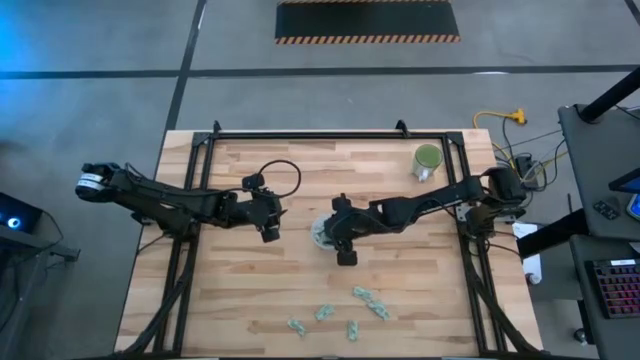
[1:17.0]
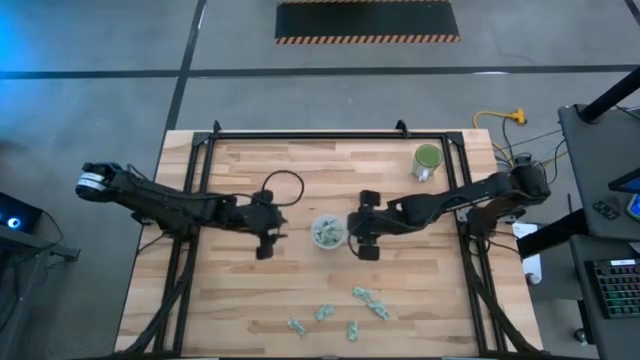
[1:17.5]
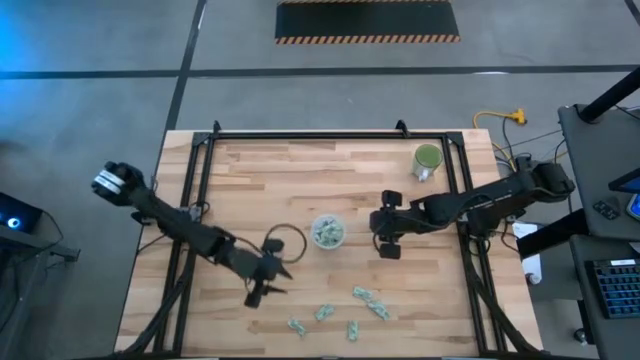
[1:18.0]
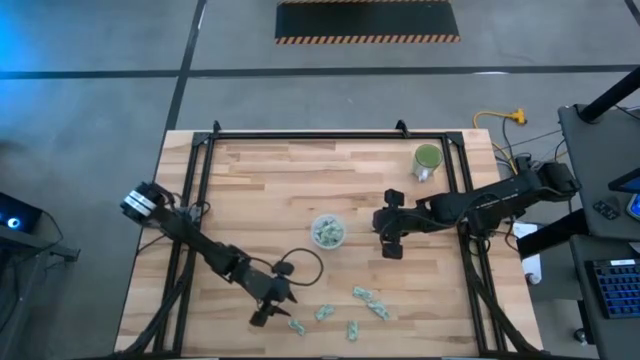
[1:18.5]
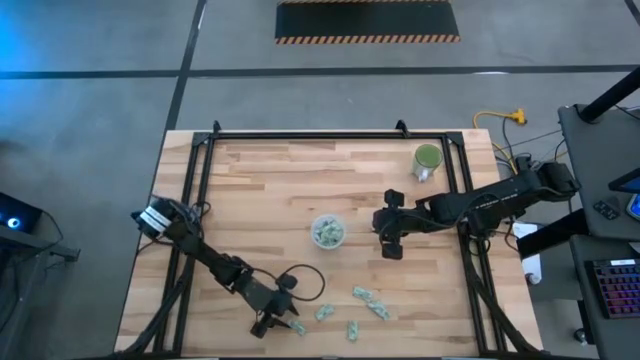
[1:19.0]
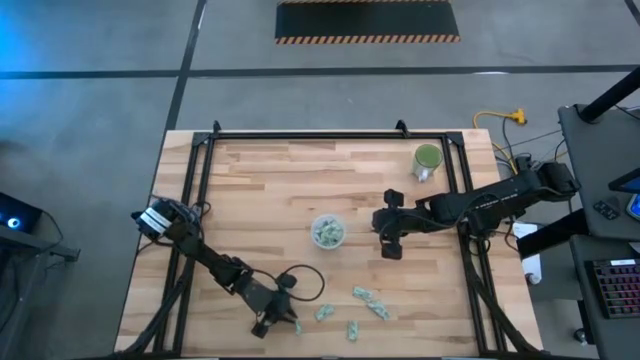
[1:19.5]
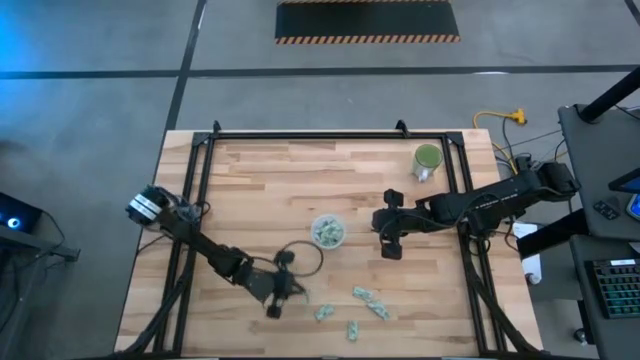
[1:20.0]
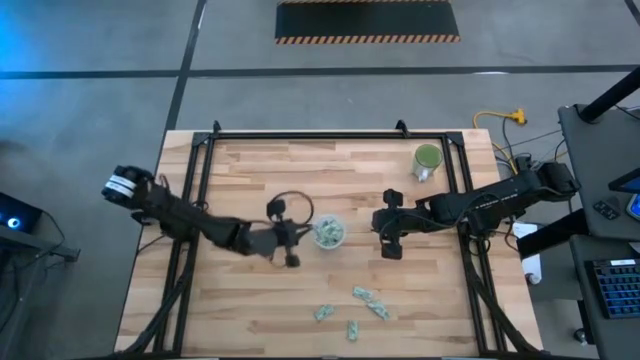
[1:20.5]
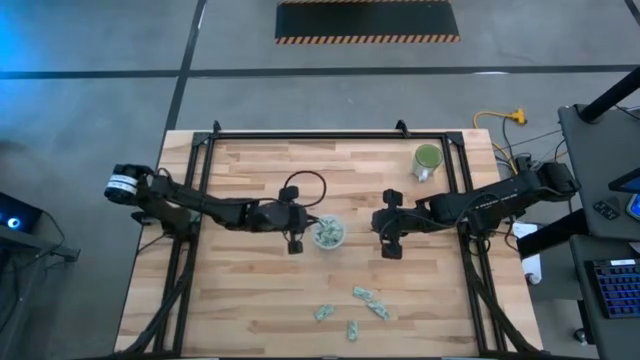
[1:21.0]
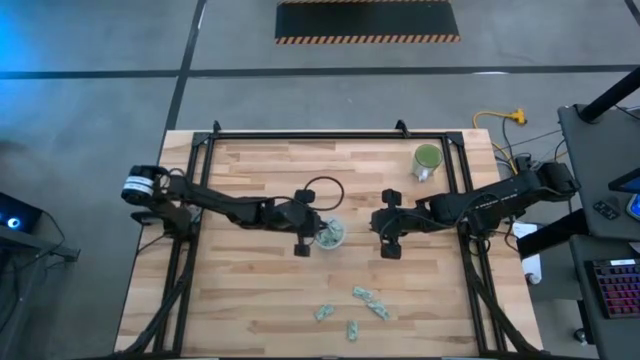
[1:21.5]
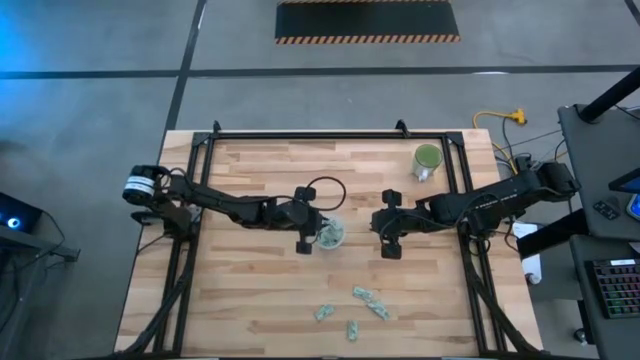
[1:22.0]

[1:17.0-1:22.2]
Task: Pick and place Stevia / Truvia into bins
Put the light green stevia packet into the transparent container

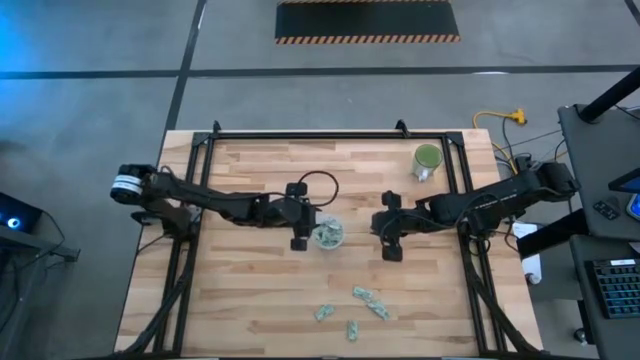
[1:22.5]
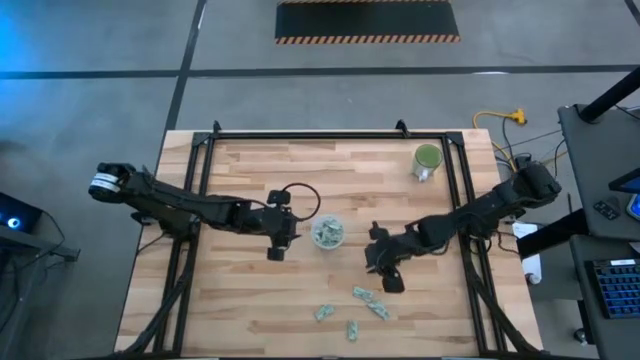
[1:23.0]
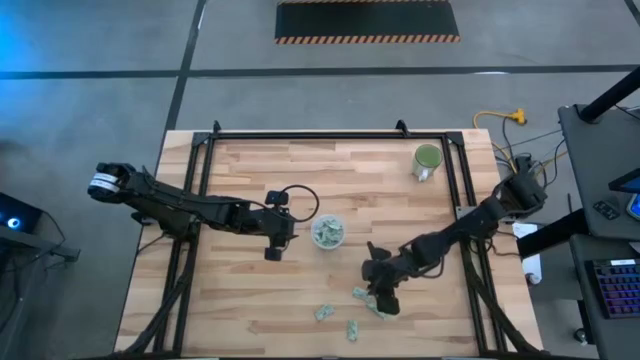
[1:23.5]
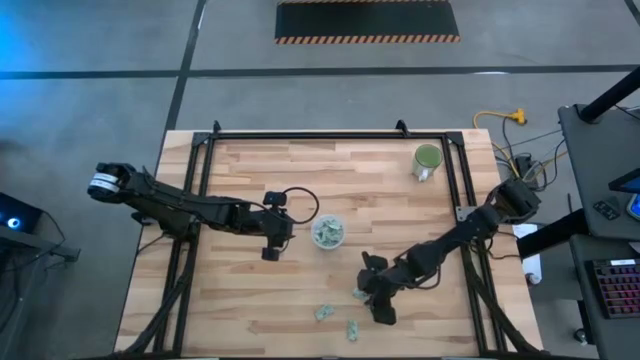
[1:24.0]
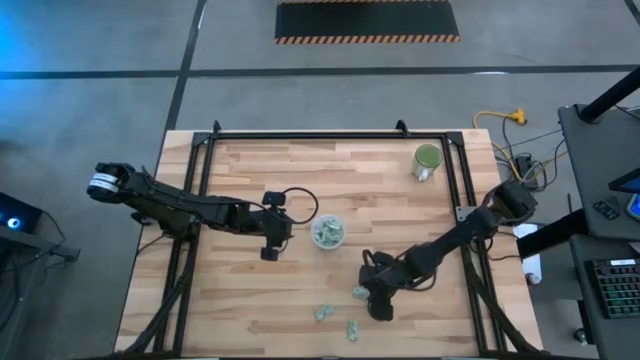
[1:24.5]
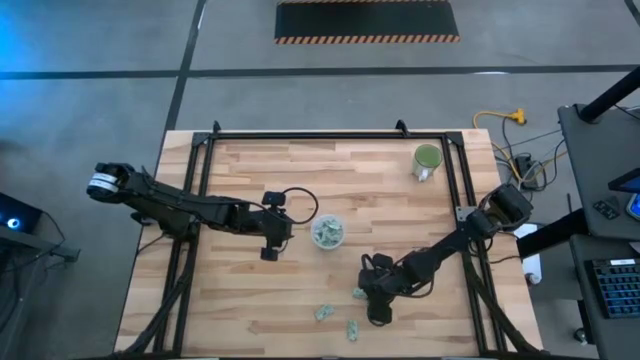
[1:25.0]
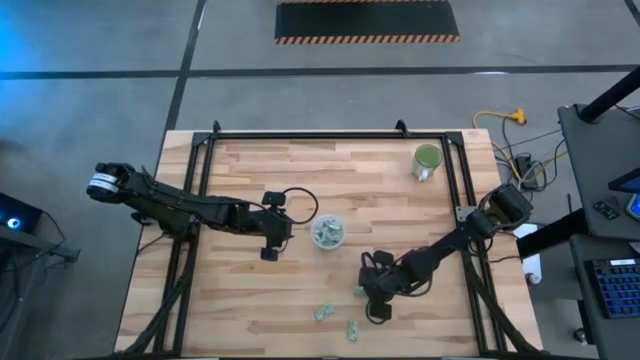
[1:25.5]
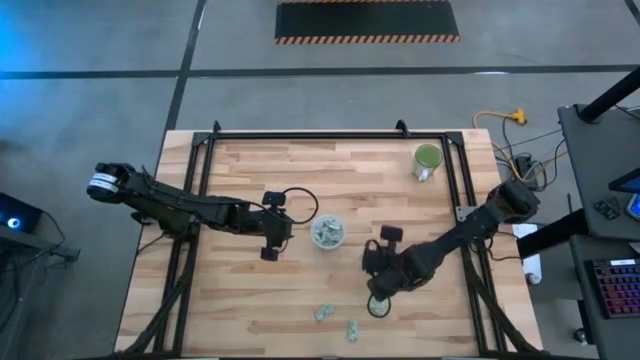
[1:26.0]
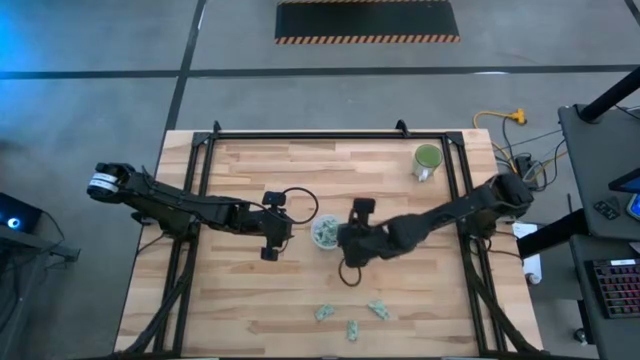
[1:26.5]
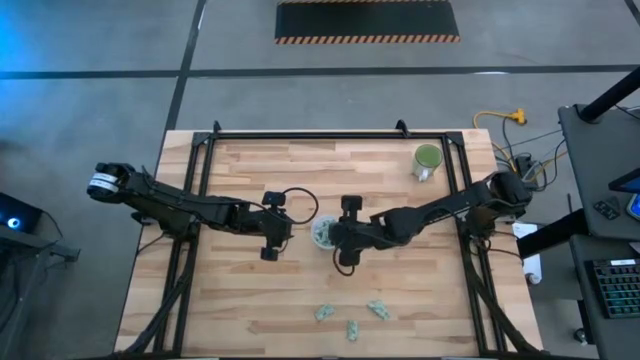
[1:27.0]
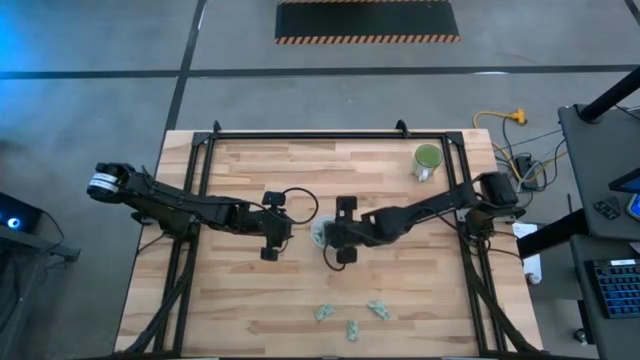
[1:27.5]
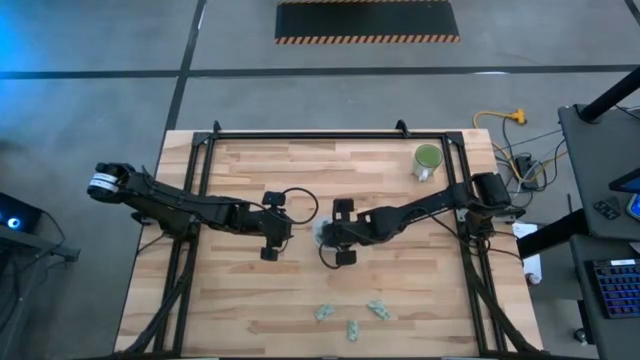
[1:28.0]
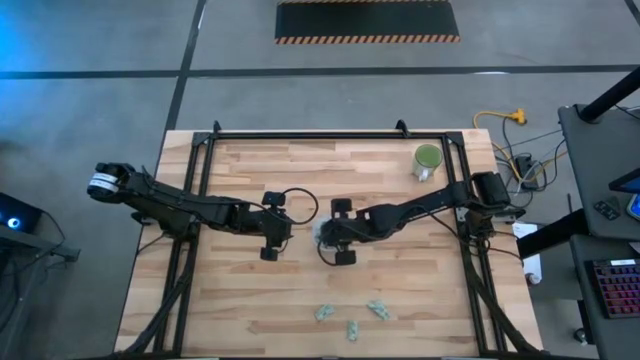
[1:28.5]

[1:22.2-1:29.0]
Put the light green stevia packet into the transparent container

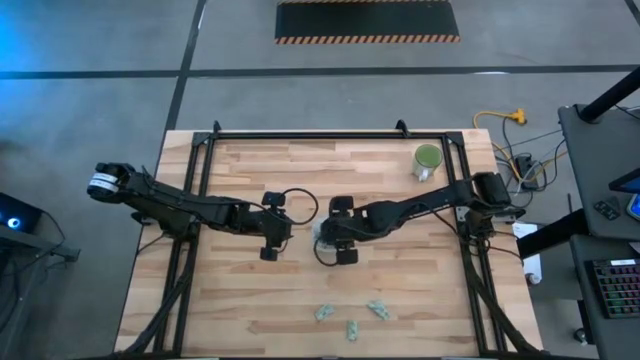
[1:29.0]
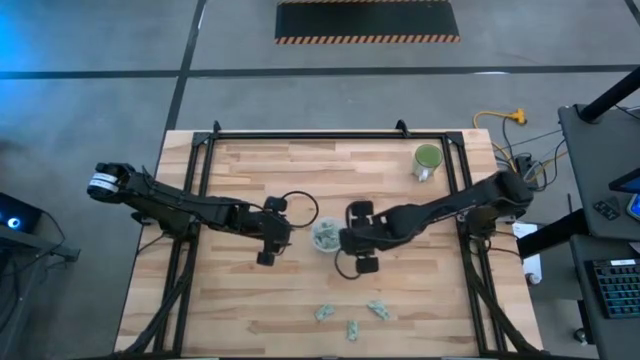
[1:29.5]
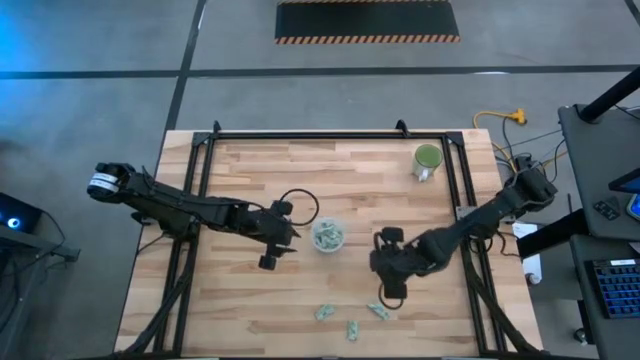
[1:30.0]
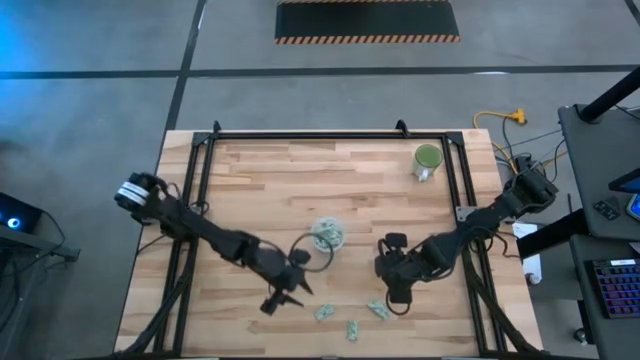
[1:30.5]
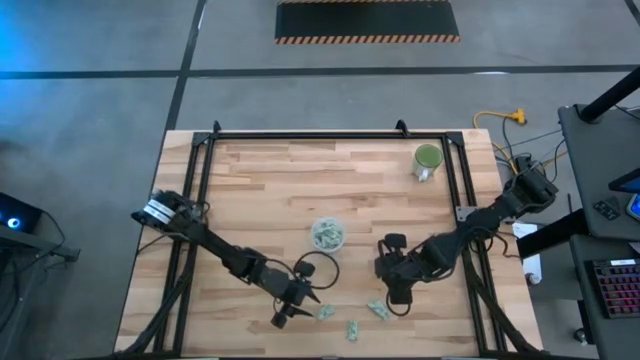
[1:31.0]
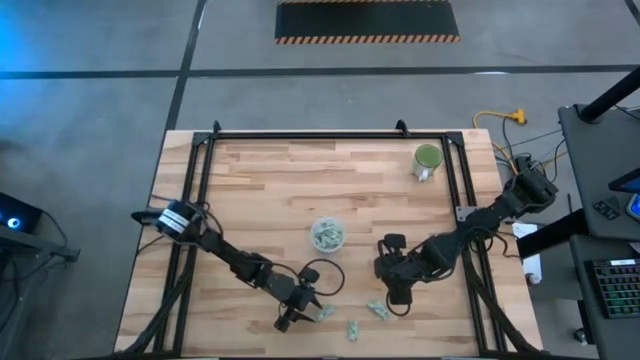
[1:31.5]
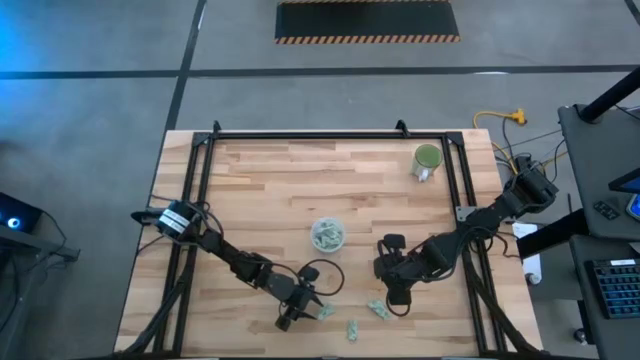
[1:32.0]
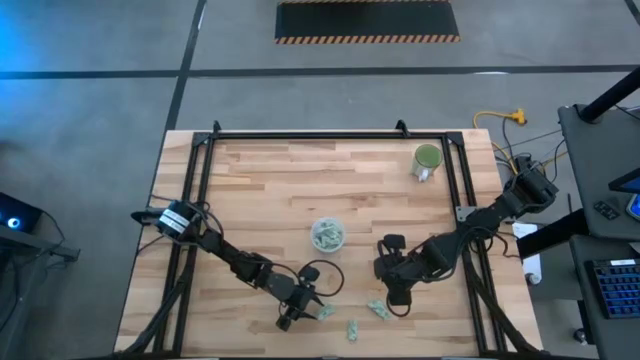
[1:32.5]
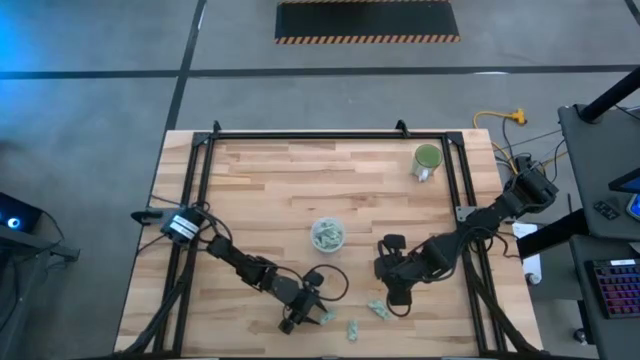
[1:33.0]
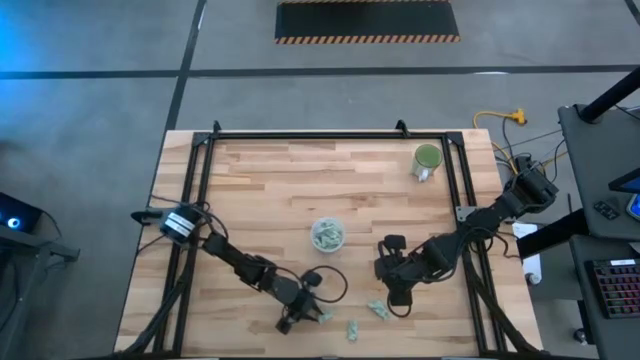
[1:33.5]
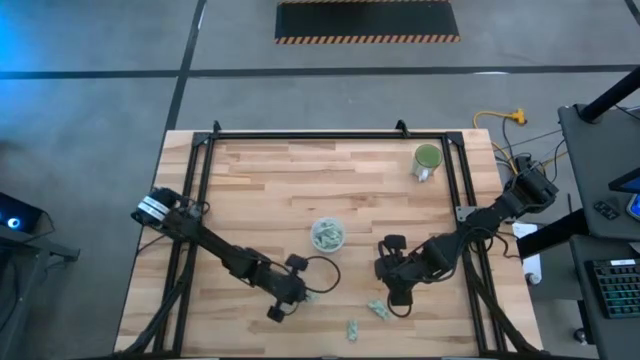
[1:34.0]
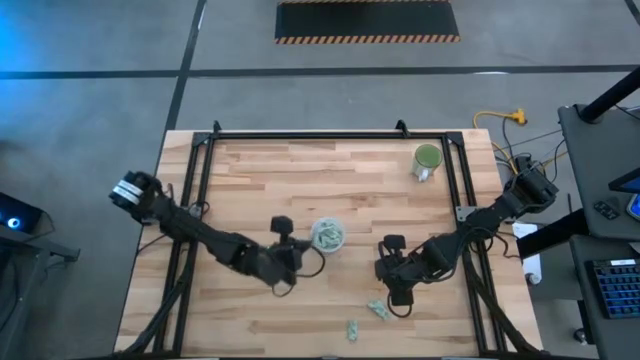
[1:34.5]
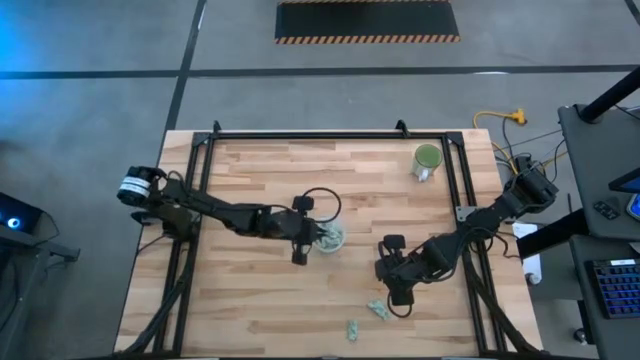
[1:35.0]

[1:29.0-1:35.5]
Put the light green stevia packet into the transparent container

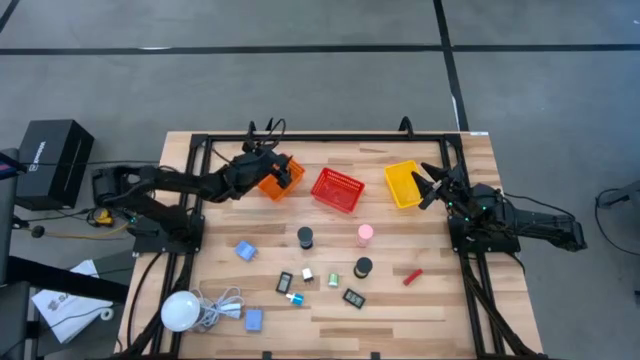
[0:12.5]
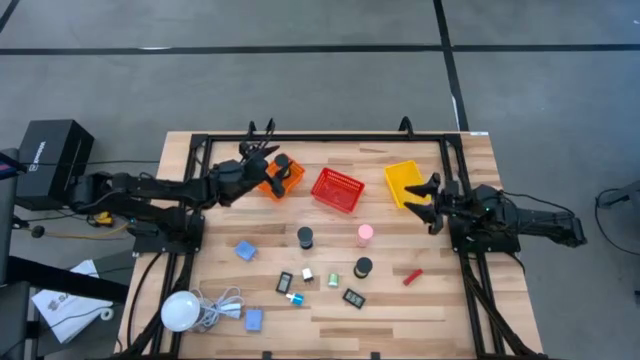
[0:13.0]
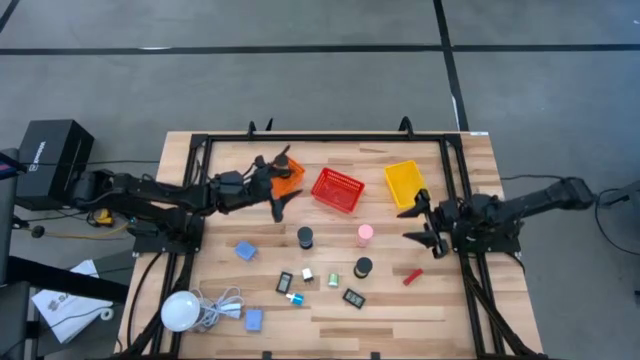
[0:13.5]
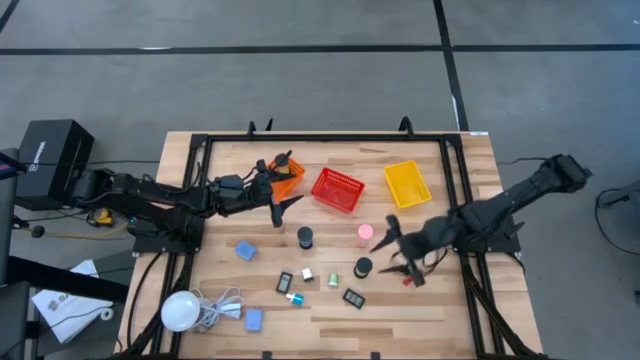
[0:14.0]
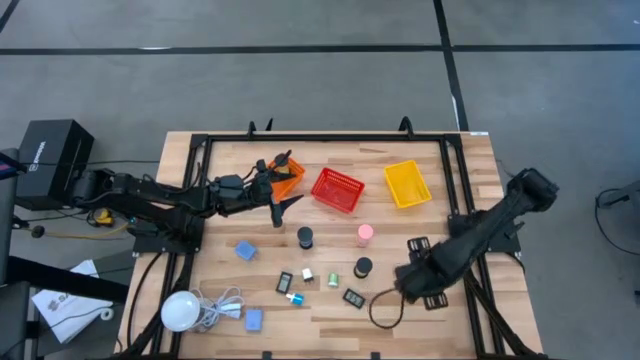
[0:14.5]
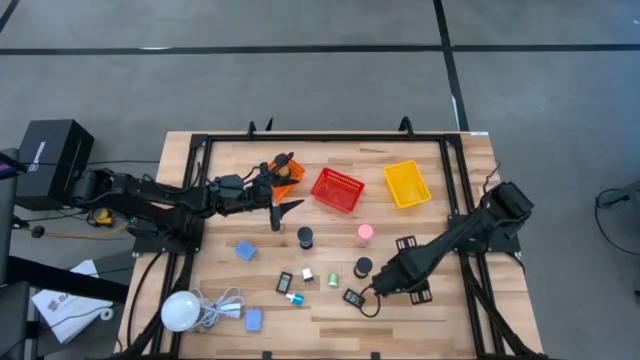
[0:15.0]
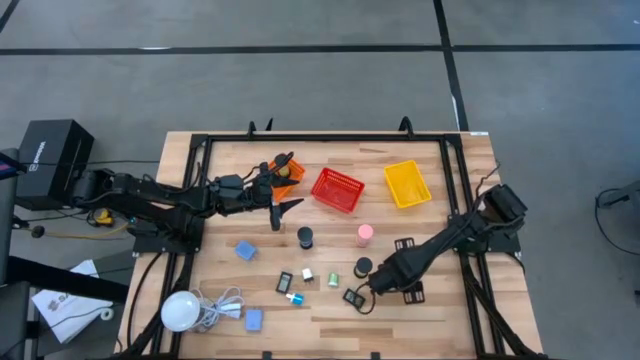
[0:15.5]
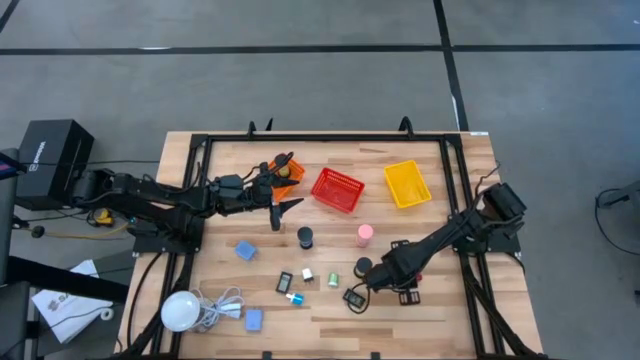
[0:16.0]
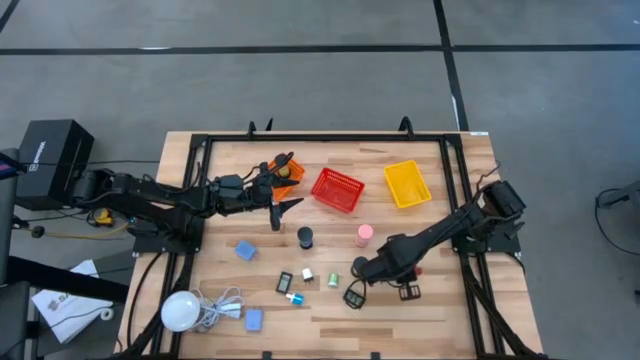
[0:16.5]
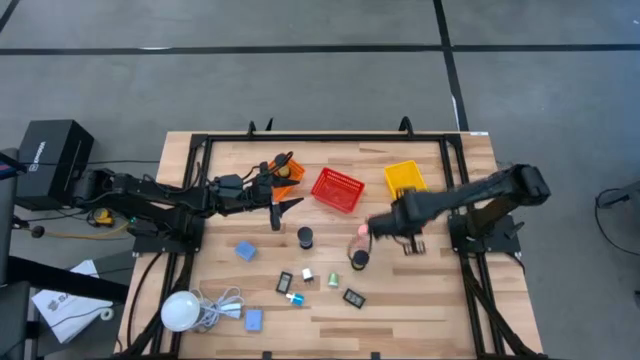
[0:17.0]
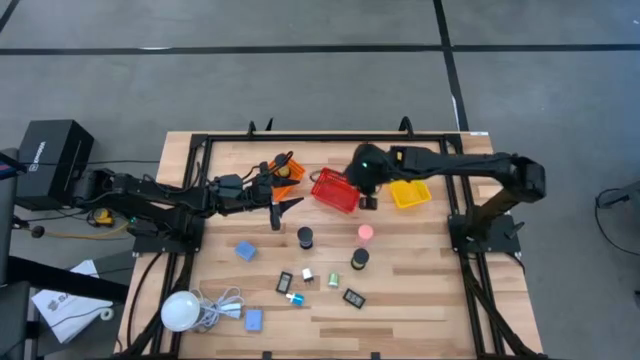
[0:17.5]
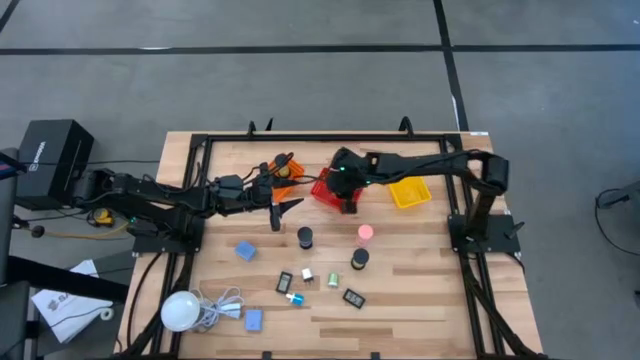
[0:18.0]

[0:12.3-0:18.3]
Task: Pick & Place Office items
Put the red digital clock into the red bin
